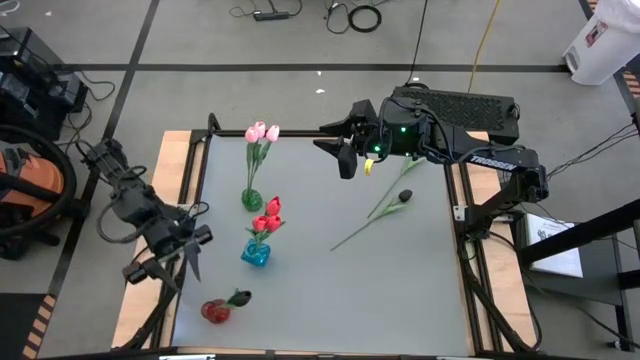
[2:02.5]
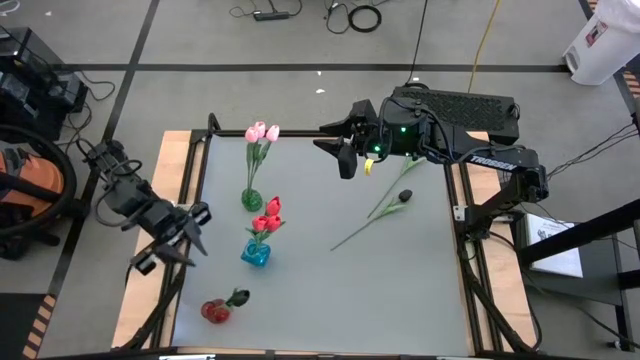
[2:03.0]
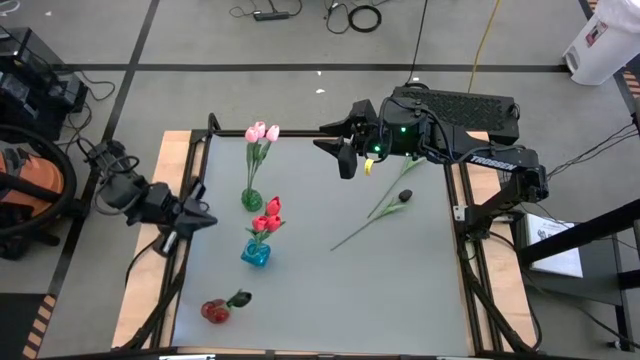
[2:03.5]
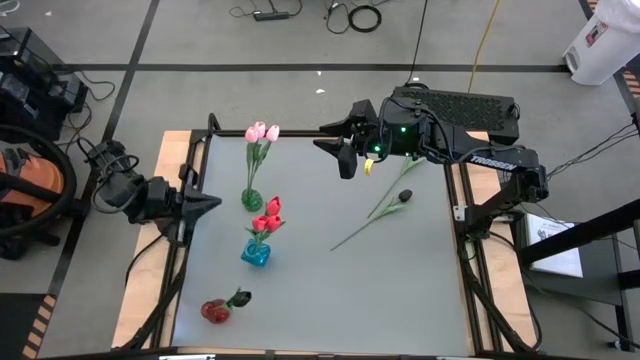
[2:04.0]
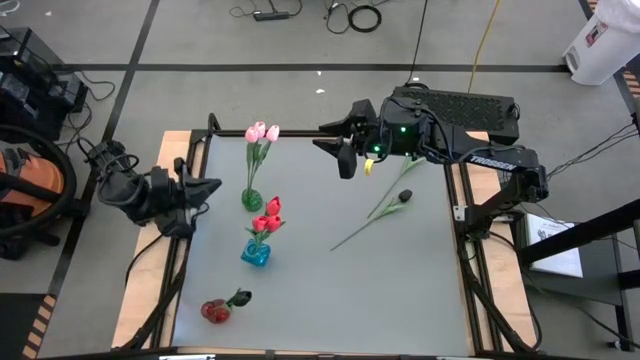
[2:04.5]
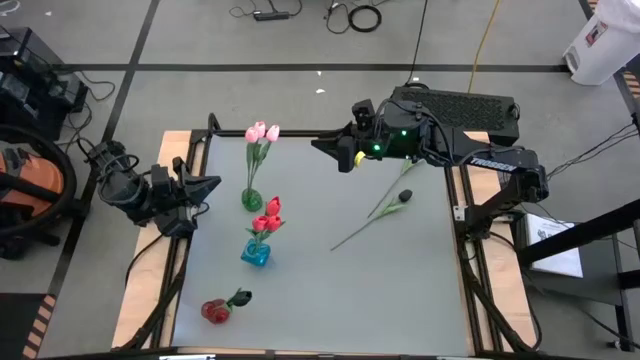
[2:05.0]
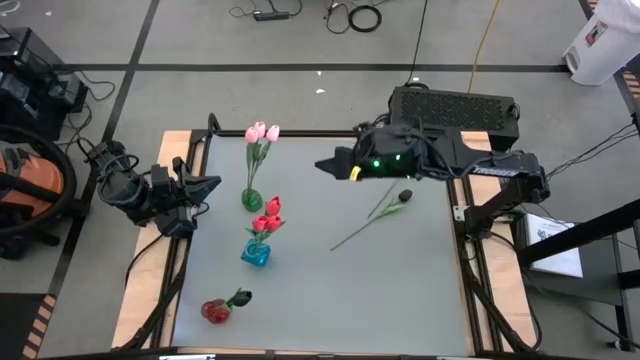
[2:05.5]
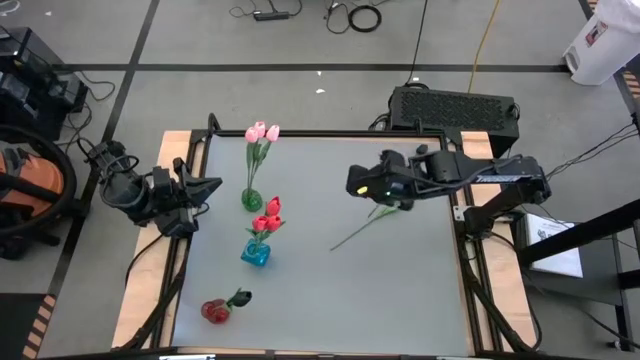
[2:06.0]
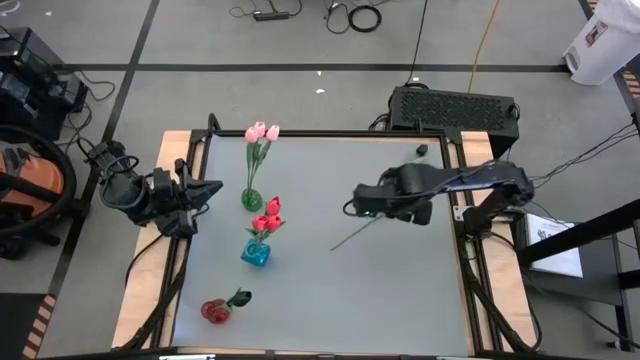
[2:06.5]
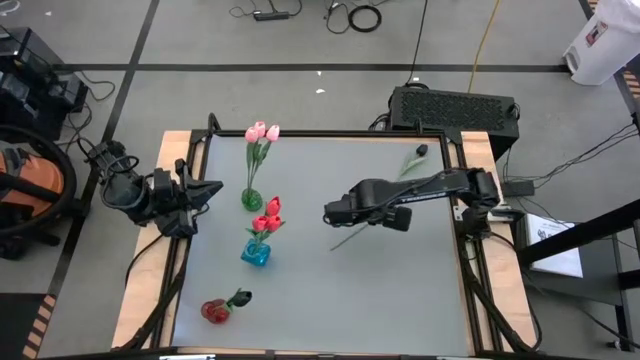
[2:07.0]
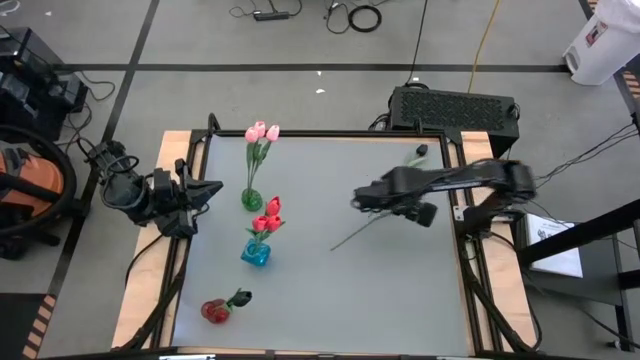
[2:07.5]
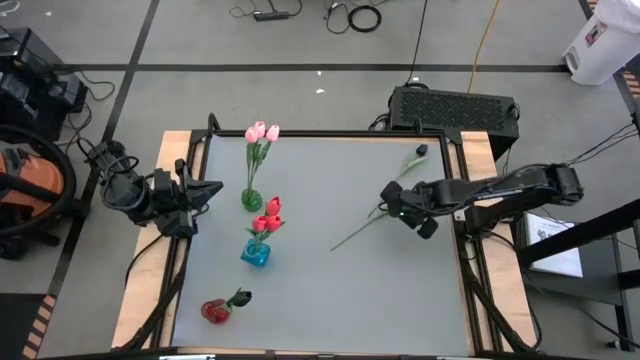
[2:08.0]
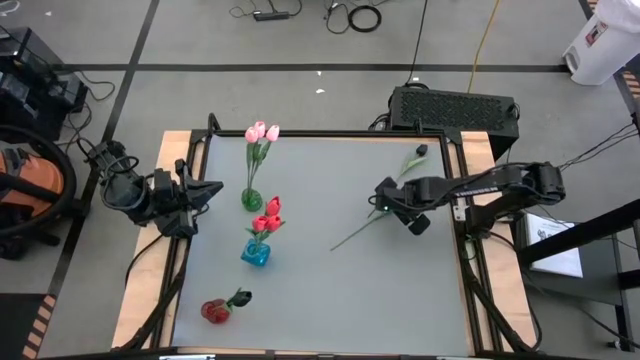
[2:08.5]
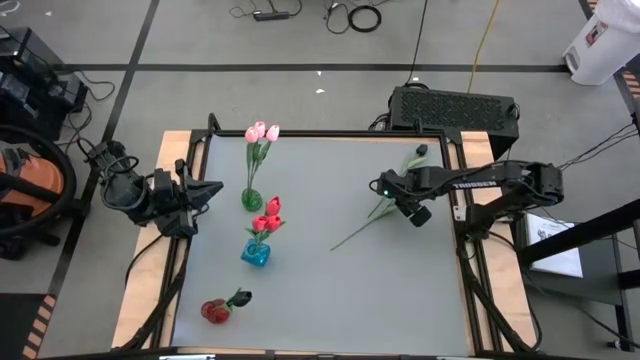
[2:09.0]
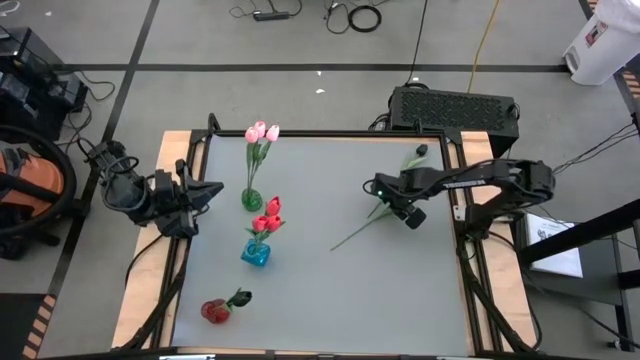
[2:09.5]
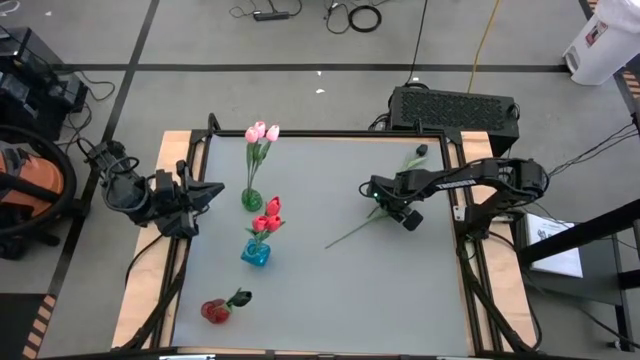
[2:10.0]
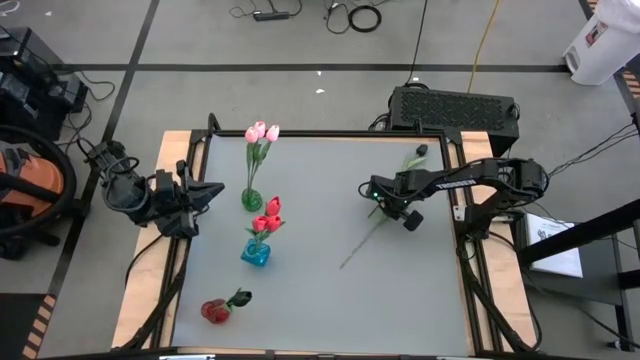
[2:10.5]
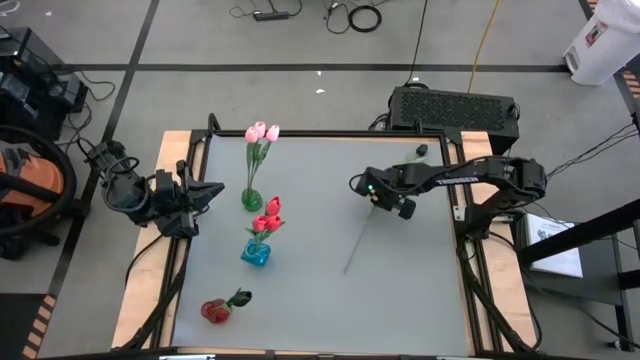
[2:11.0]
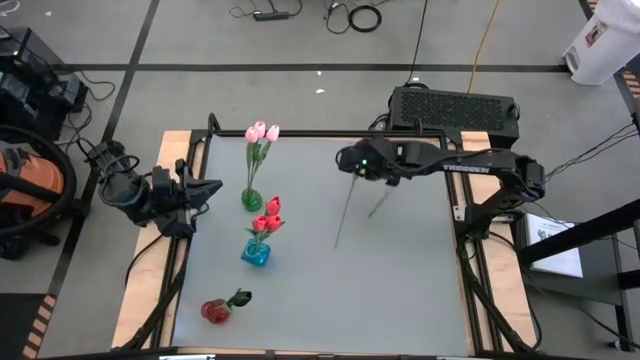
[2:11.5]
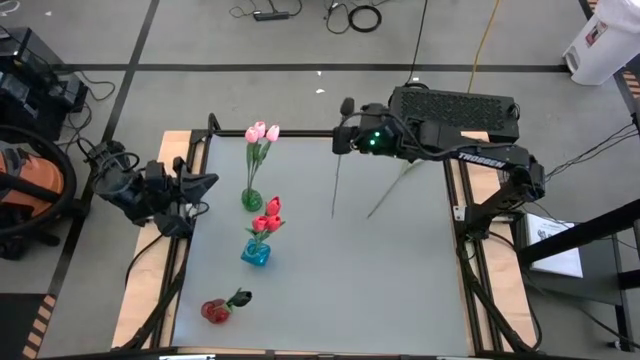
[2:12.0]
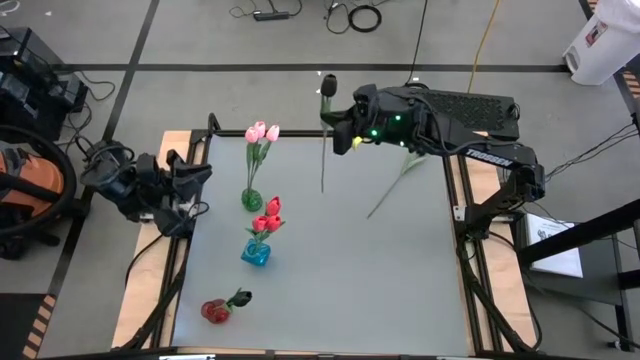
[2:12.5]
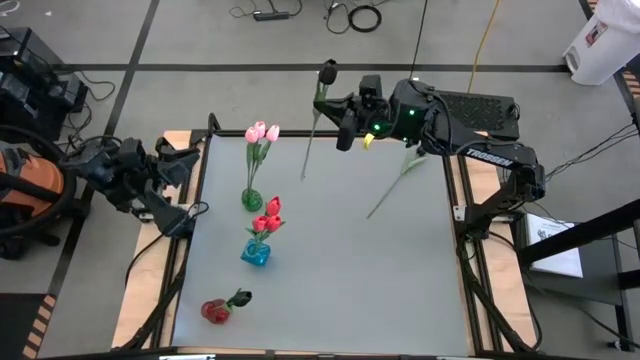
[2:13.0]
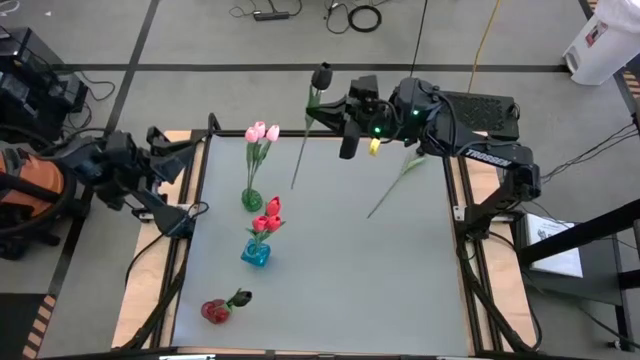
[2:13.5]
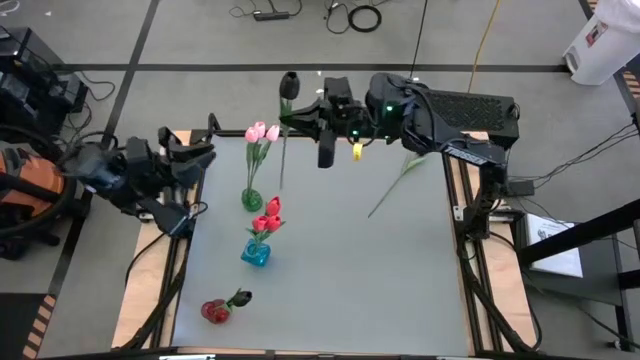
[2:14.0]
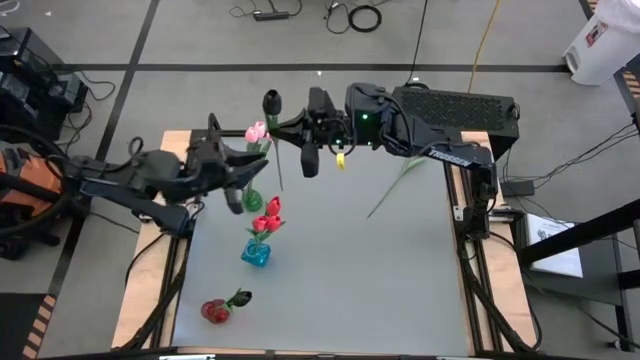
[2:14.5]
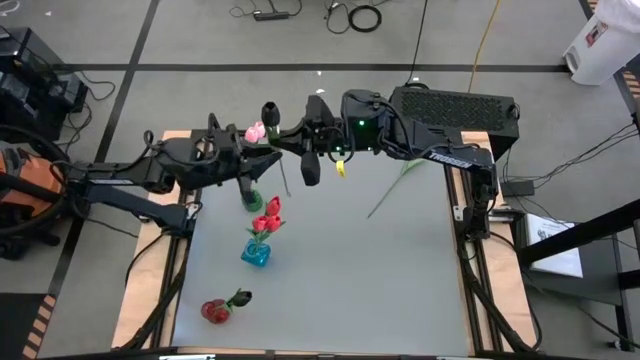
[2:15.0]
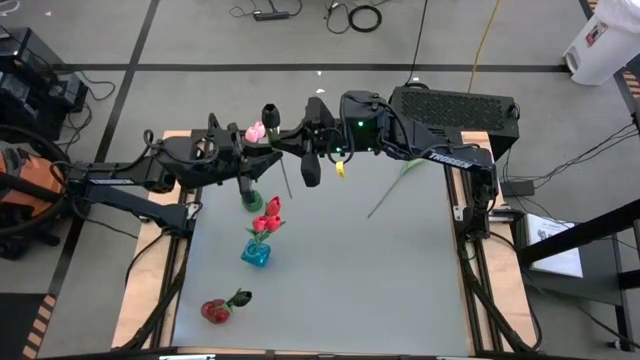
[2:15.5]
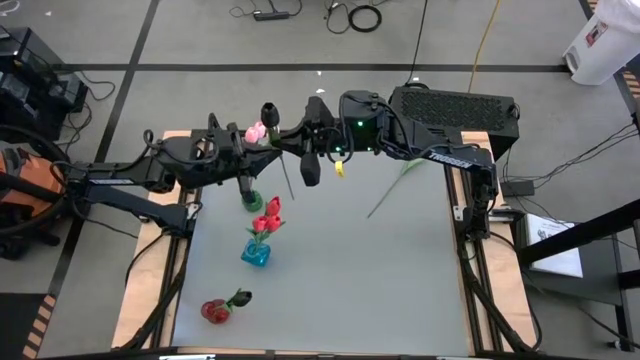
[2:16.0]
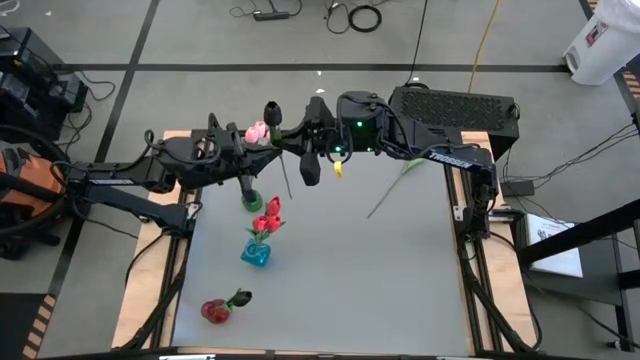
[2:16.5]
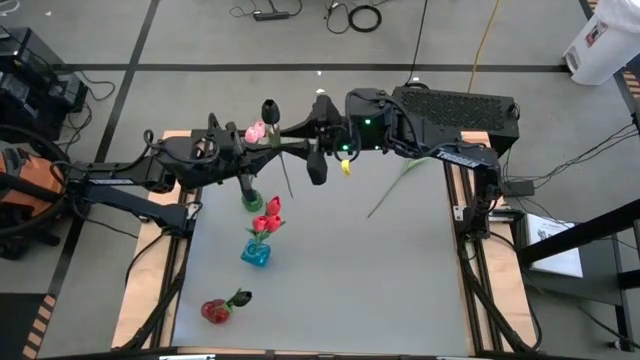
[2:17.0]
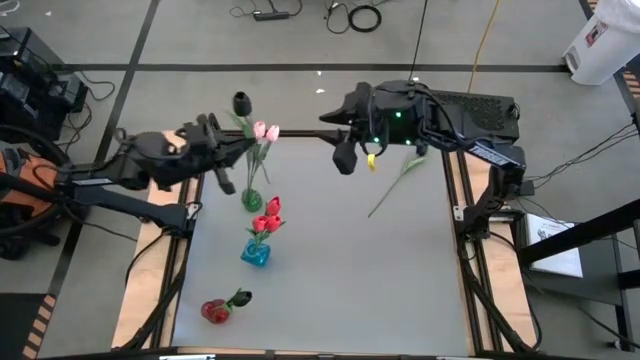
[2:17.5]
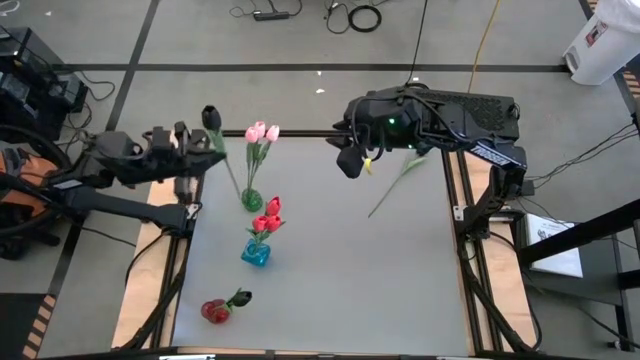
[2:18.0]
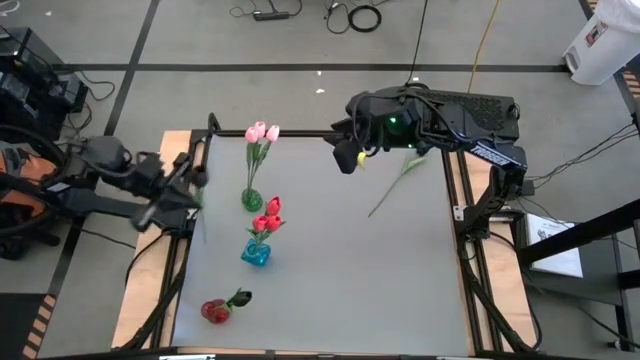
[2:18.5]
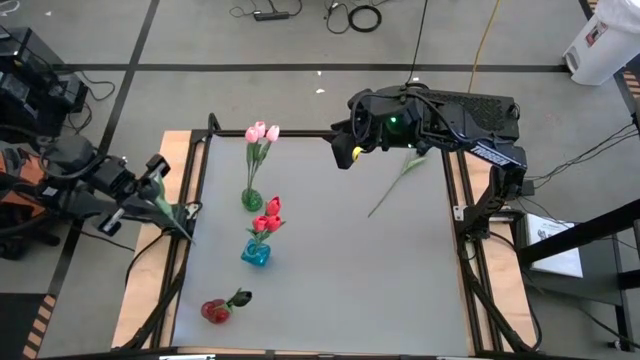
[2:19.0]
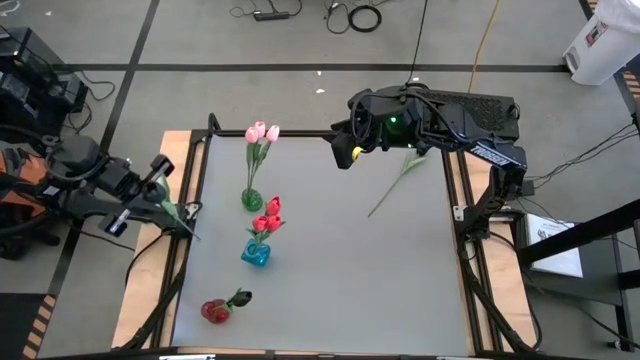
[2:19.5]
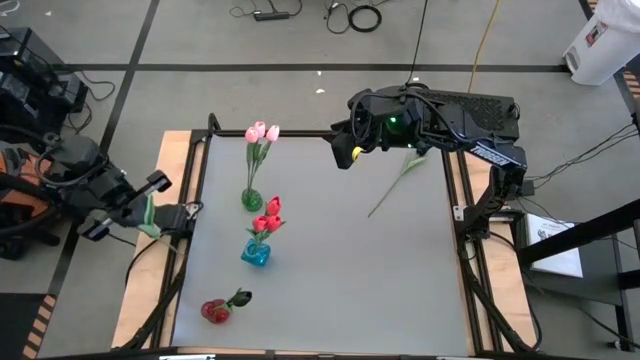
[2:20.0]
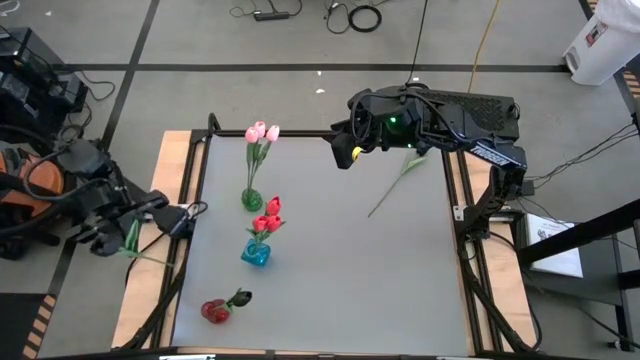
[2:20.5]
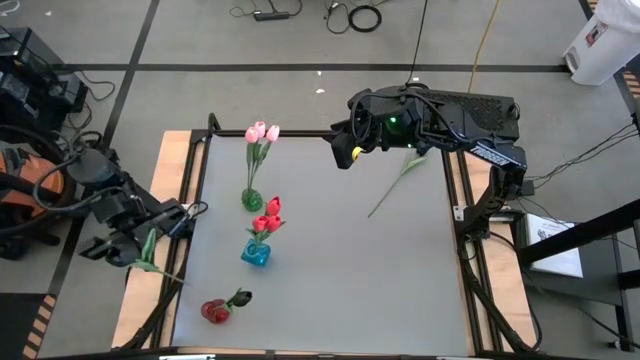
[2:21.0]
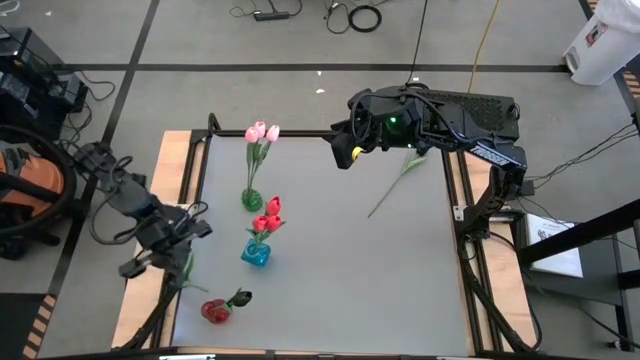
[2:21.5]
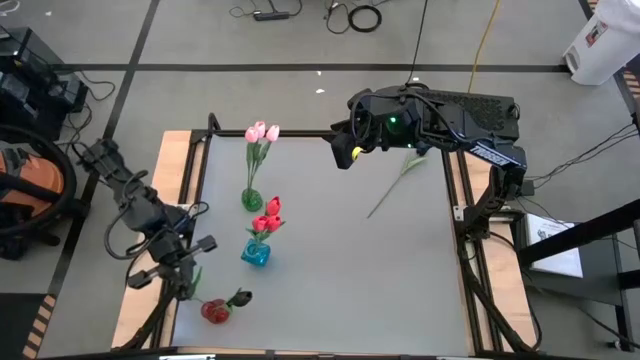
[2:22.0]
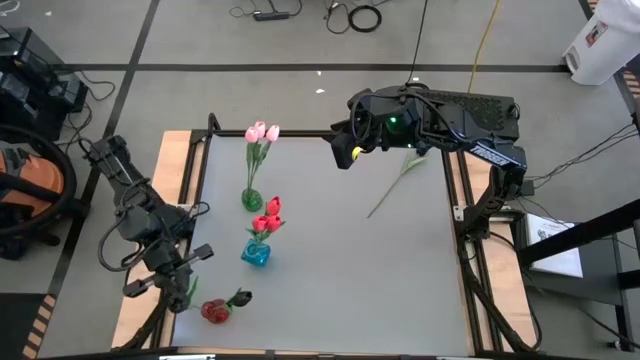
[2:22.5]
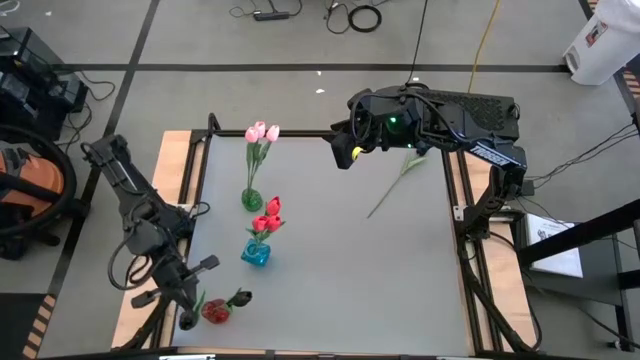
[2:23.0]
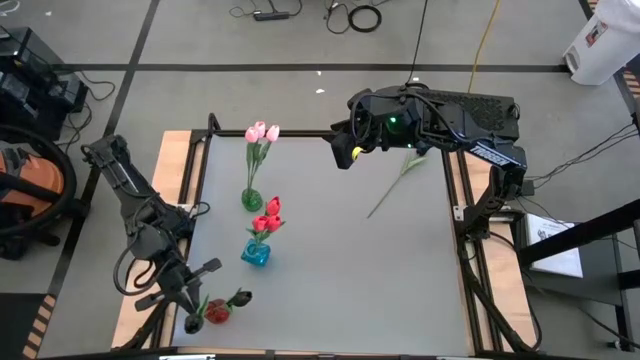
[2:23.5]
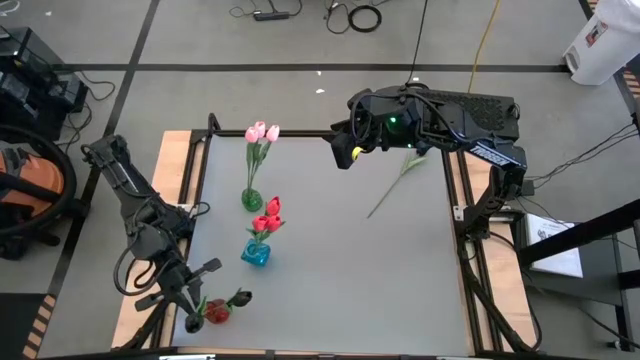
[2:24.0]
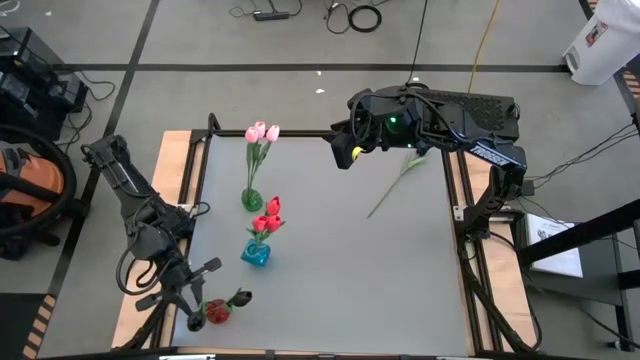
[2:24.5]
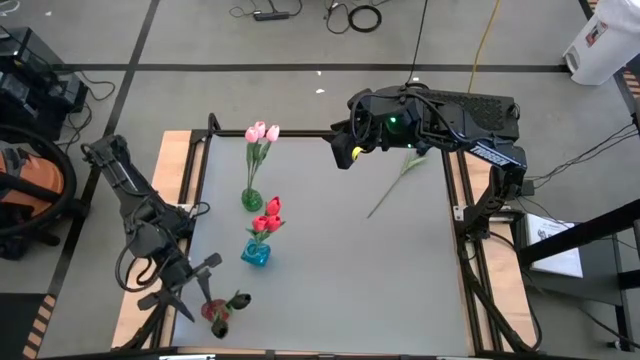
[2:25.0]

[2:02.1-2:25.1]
Task: Sort flowers into vase by color
Put the bottom black flower into the red vase
